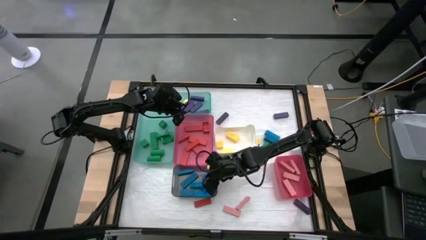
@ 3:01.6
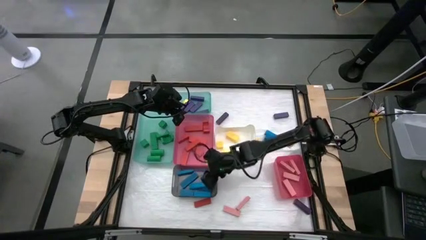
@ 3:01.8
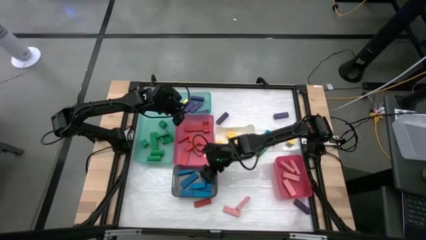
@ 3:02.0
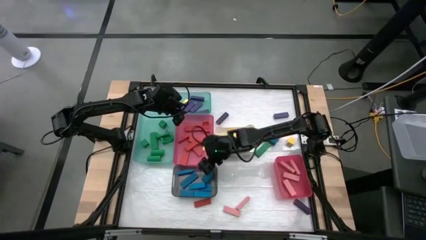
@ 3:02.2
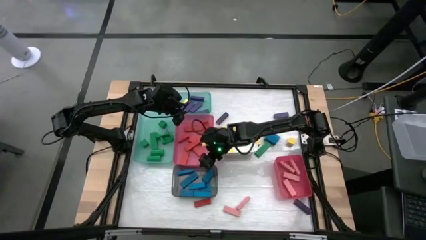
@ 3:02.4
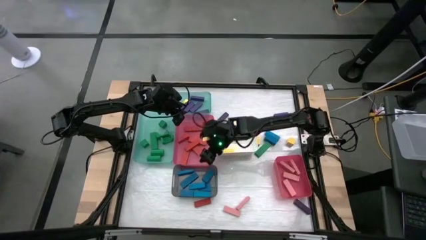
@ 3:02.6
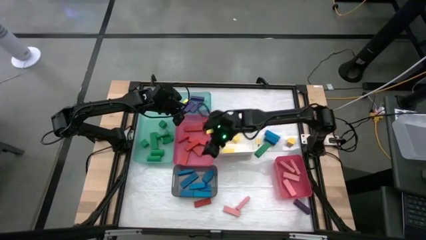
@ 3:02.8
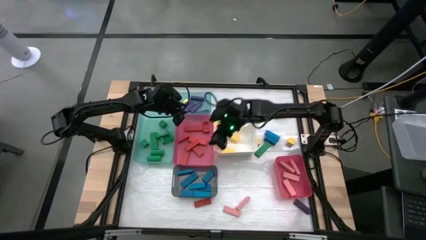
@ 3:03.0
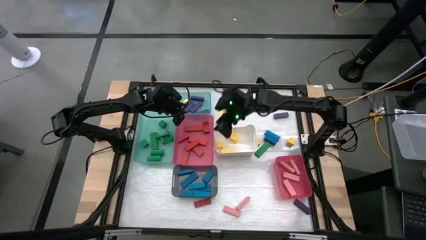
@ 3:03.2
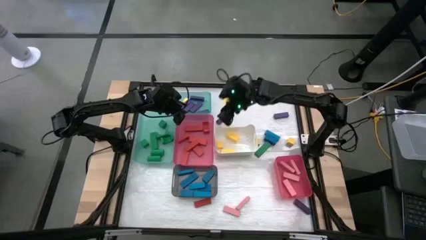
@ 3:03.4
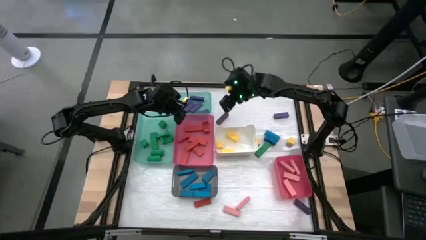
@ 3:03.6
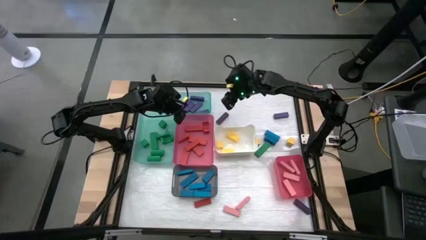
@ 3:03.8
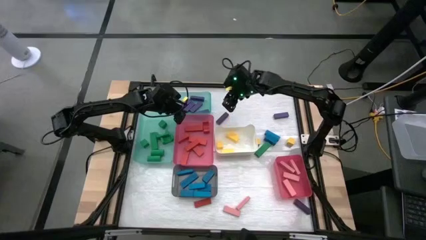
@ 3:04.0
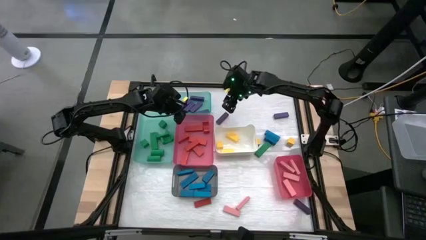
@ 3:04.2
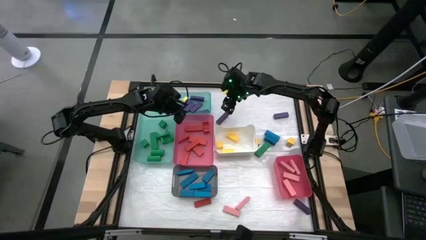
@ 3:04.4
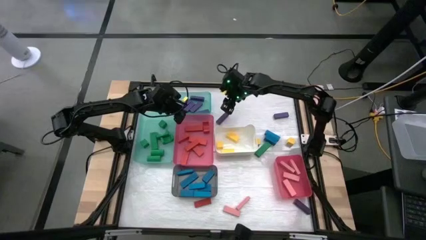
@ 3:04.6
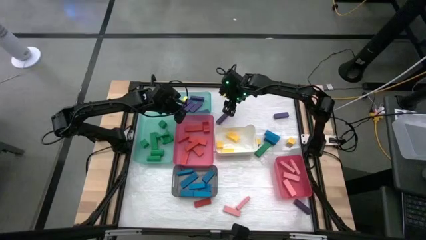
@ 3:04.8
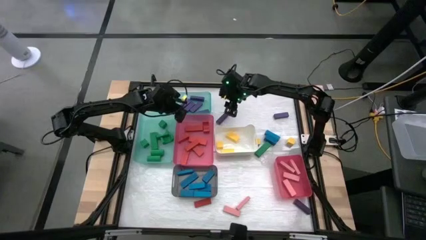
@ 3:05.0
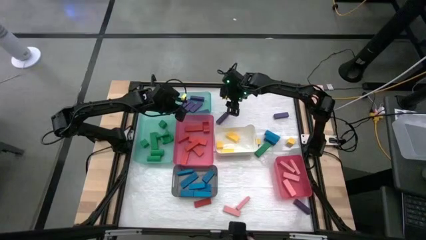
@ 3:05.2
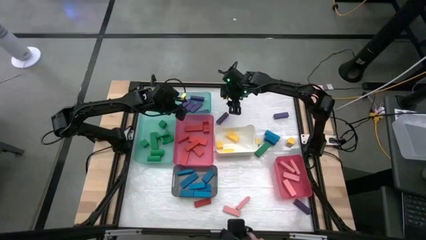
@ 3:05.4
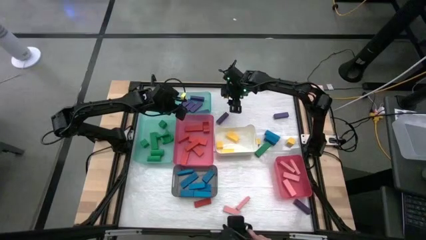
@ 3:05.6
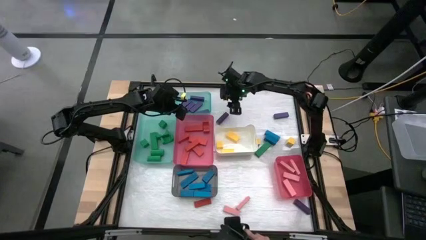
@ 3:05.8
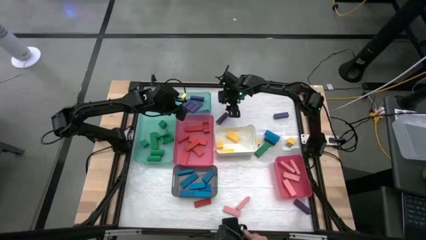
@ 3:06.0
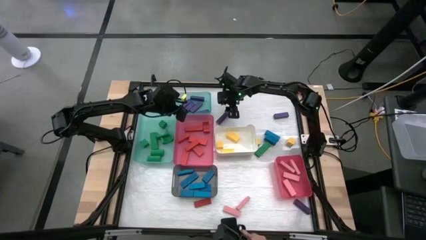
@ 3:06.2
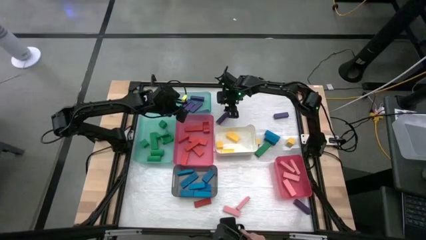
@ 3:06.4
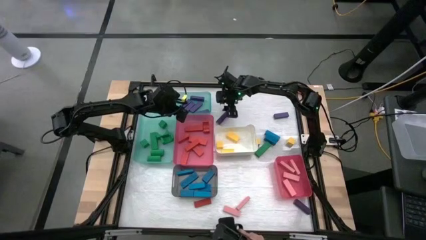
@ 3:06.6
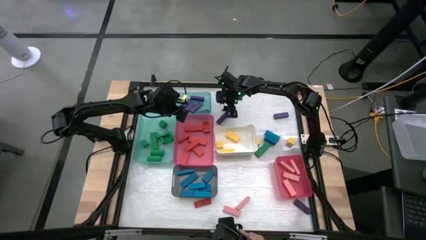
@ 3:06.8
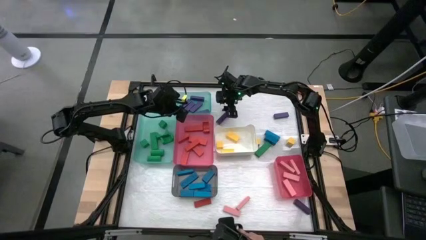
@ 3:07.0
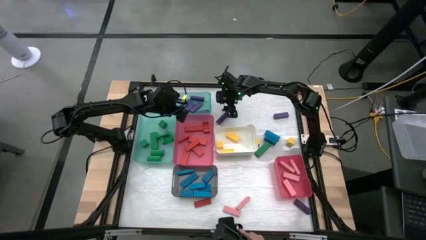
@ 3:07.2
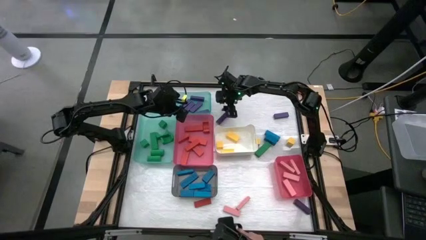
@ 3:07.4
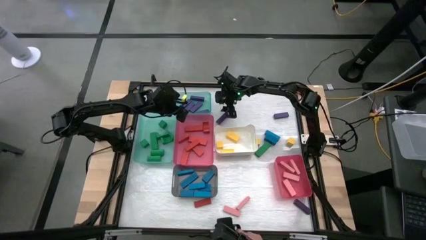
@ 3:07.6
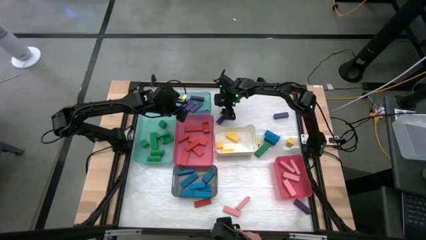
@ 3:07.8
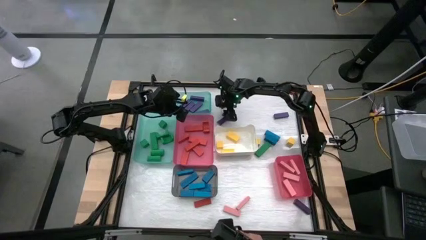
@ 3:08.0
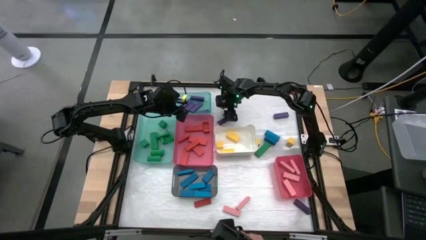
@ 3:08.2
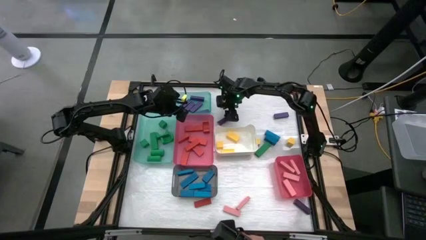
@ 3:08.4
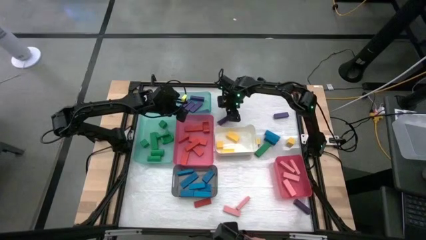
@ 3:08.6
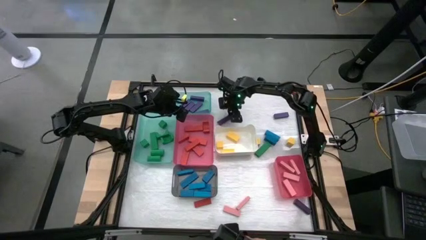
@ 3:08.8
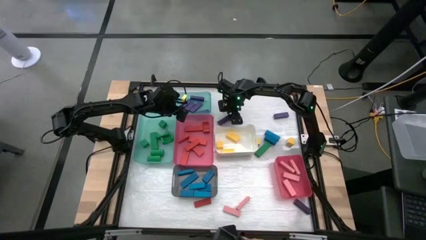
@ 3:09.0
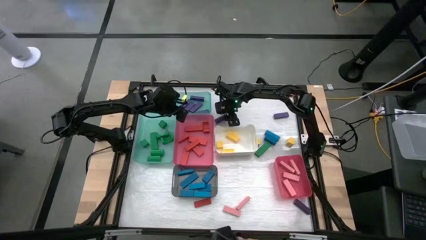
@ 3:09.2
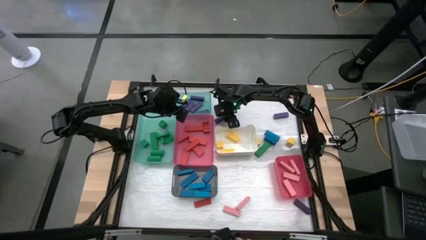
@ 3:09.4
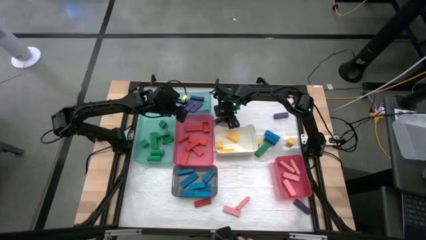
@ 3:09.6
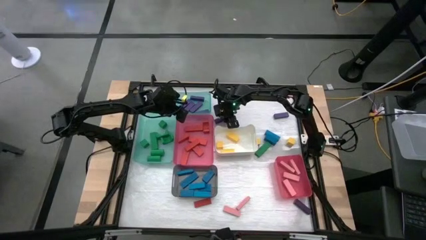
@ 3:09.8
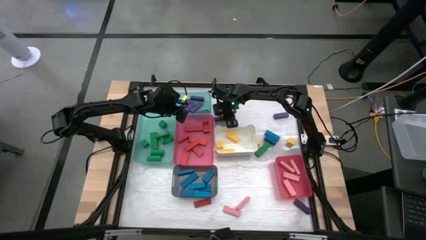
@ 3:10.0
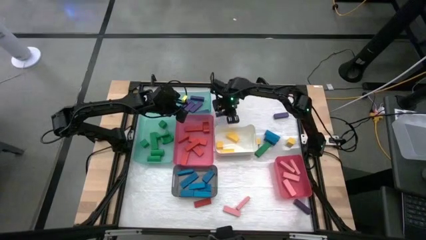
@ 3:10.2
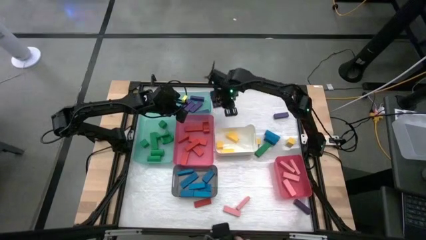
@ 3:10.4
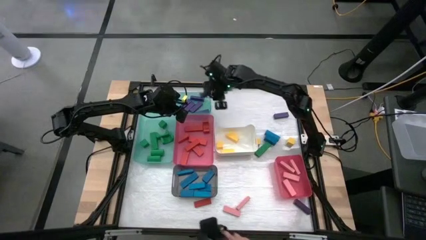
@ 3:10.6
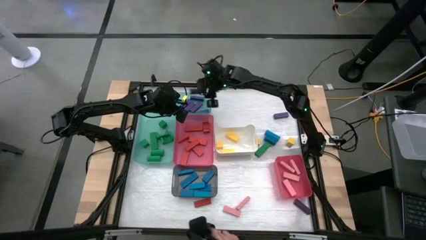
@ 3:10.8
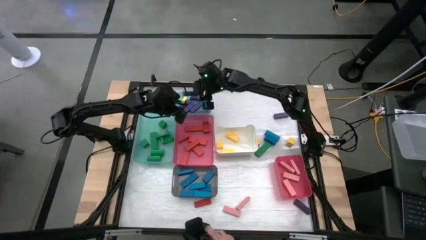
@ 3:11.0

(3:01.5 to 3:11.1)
Task: Sort blocks
Put the violet block into the top green bin

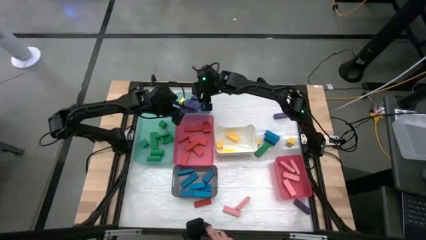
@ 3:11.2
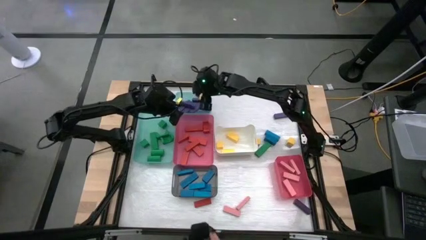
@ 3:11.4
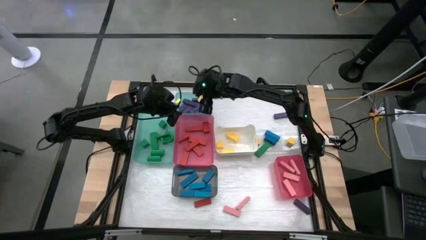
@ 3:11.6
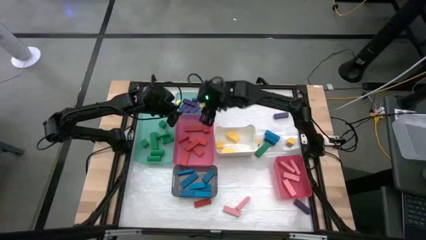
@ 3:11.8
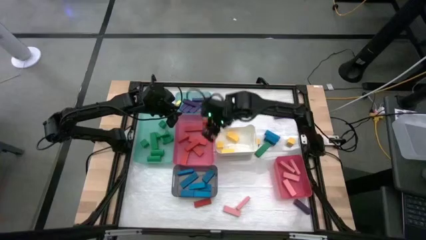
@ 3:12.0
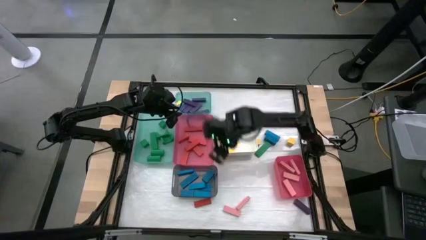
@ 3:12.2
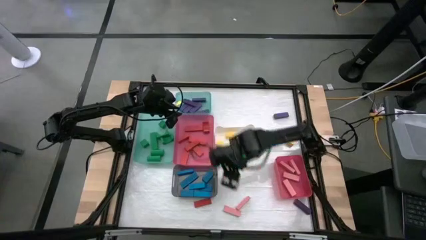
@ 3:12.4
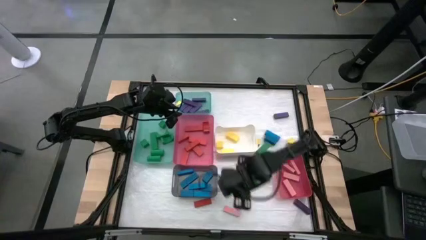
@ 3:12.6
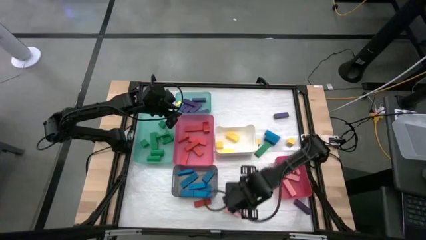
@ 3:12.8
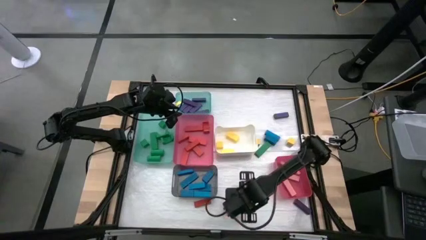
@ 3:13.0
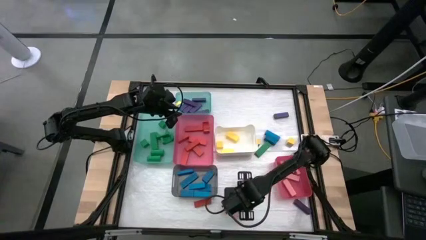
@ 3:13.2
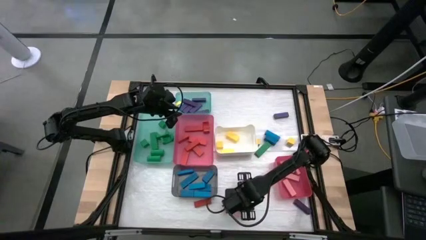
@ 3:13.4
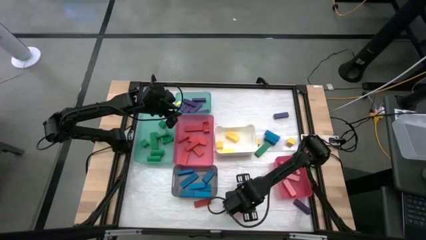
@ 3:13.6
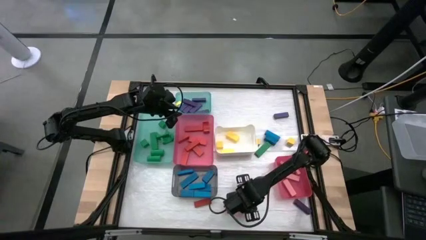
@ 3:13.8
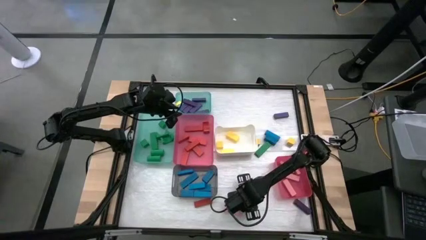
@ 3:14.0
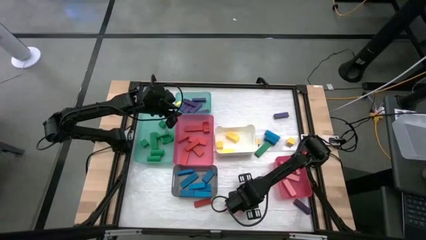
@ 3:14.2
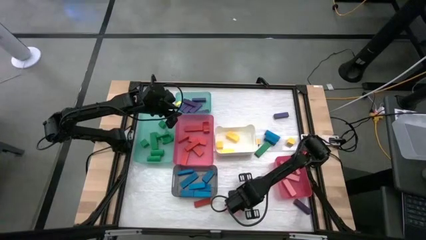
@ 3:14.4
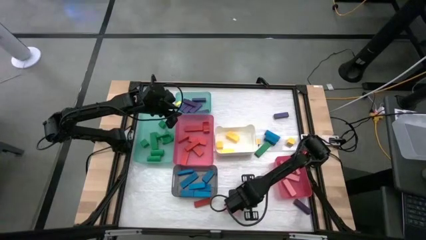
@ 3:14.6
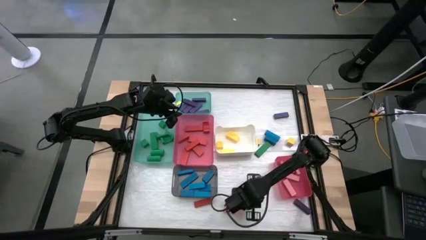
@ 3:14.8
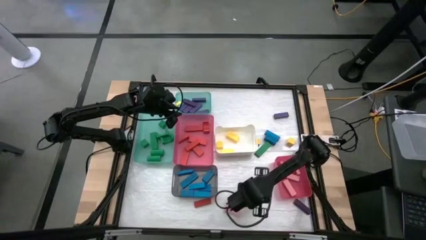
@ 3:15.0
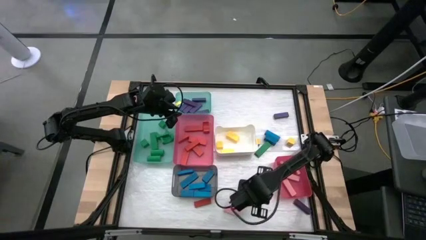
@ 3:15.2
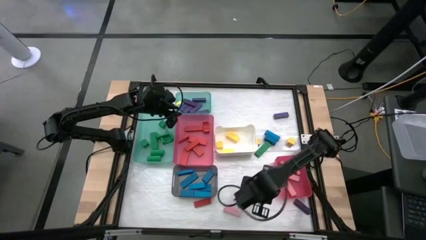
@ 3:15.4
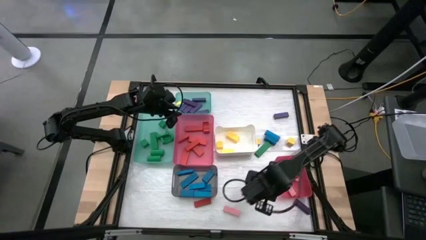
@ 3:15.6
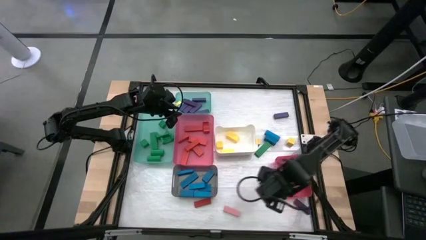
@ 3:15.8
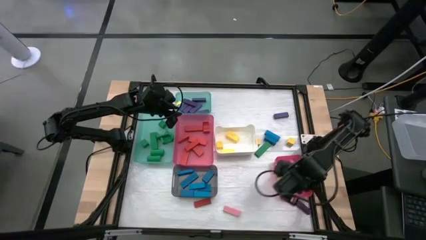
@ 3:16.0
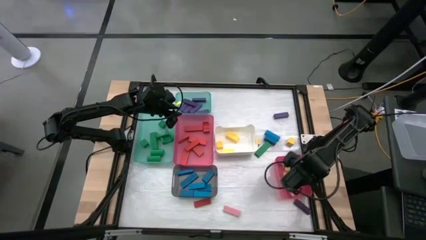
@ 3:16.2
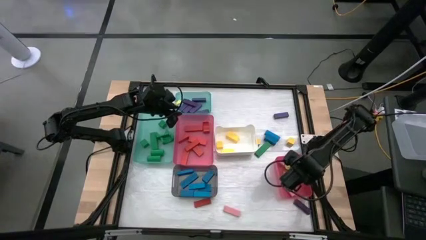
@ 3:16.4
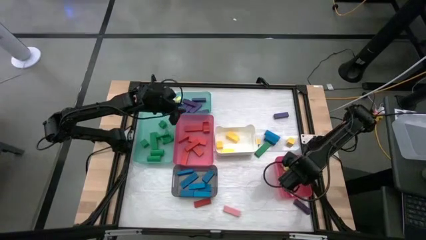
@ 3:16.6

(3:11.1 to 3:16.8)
Put the pink block into the bottom pink bin
